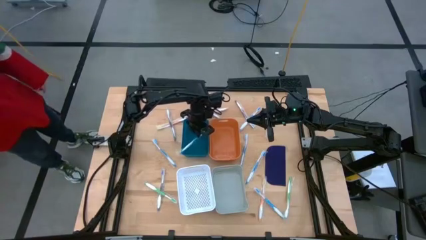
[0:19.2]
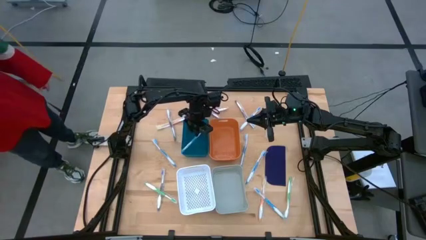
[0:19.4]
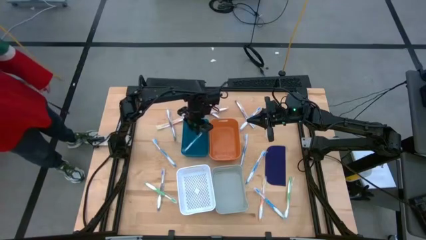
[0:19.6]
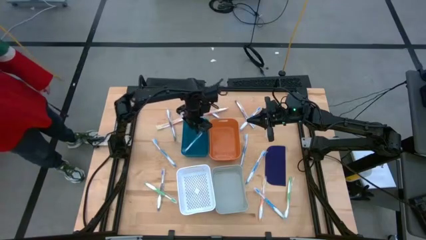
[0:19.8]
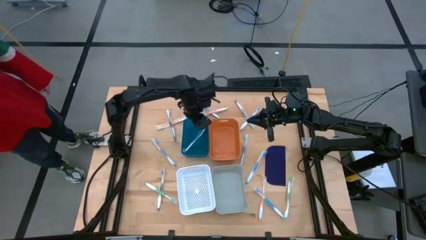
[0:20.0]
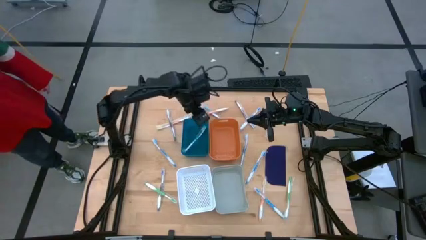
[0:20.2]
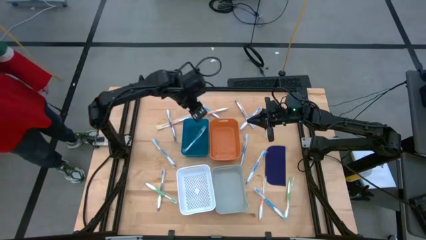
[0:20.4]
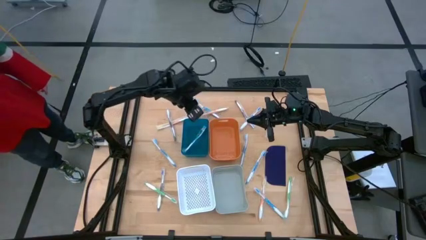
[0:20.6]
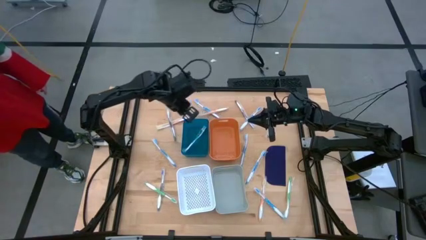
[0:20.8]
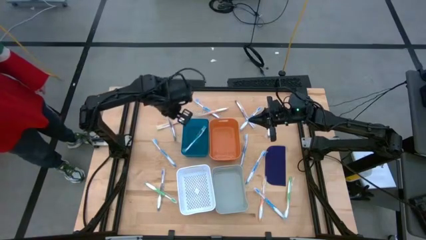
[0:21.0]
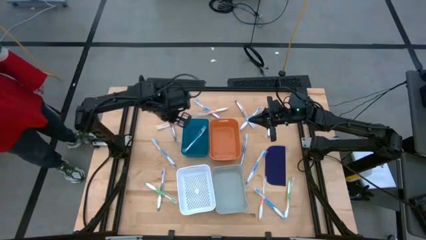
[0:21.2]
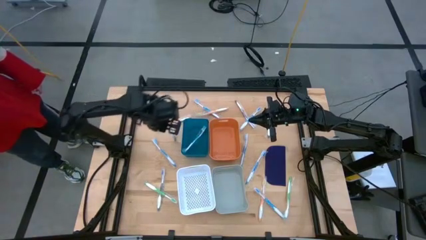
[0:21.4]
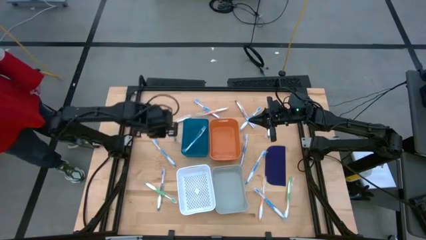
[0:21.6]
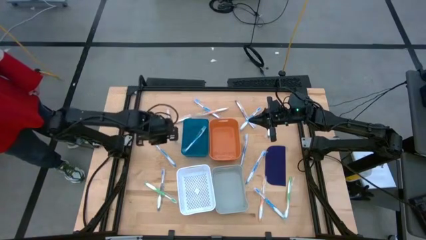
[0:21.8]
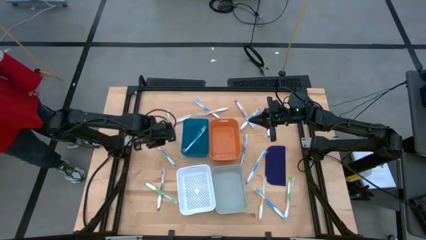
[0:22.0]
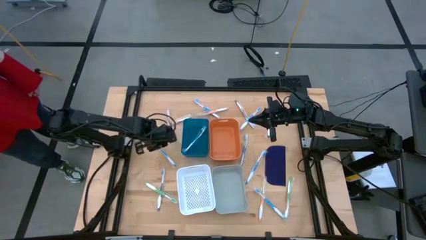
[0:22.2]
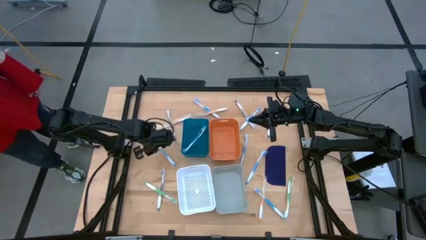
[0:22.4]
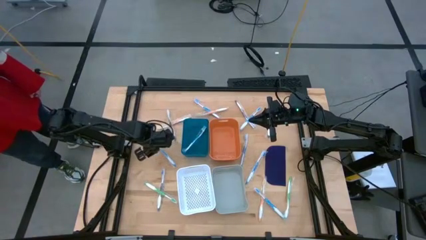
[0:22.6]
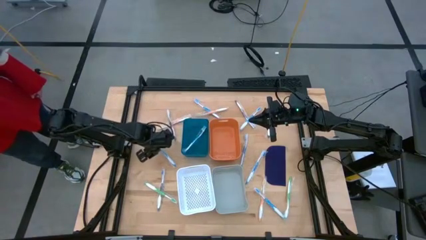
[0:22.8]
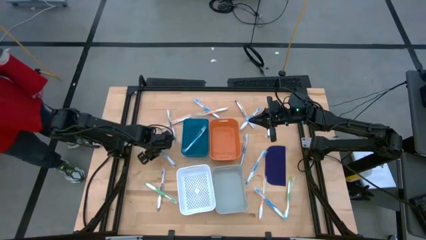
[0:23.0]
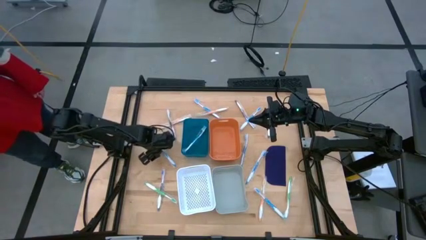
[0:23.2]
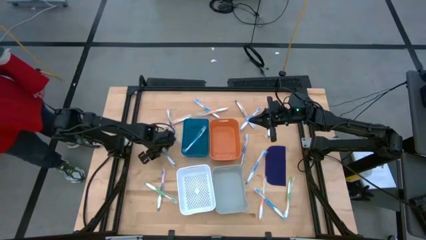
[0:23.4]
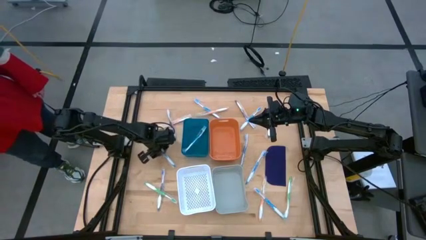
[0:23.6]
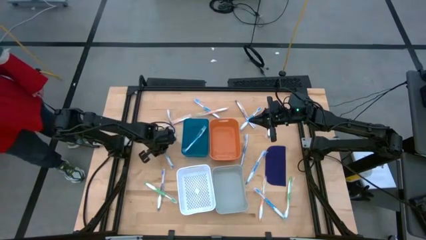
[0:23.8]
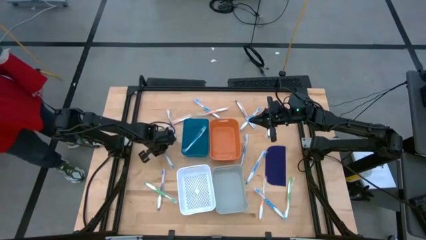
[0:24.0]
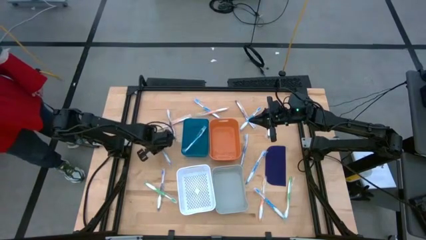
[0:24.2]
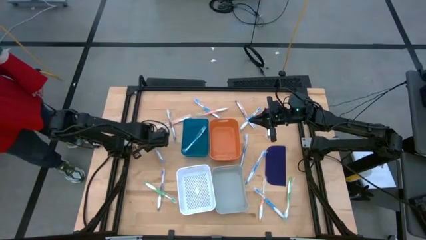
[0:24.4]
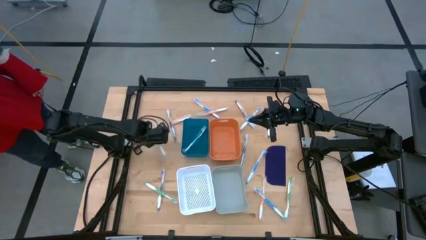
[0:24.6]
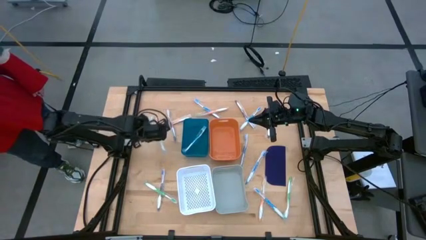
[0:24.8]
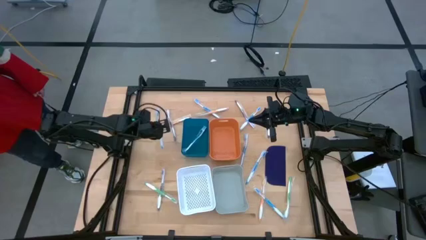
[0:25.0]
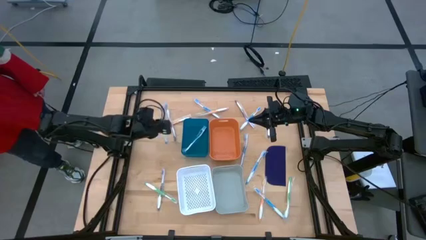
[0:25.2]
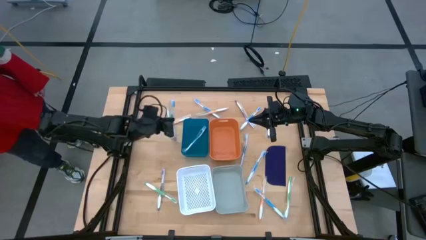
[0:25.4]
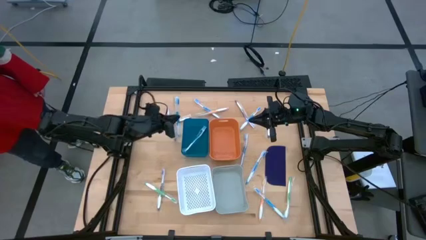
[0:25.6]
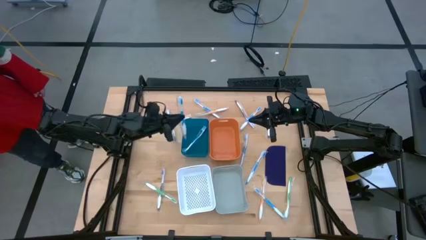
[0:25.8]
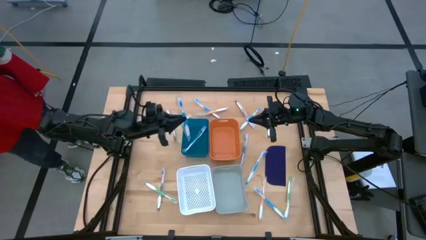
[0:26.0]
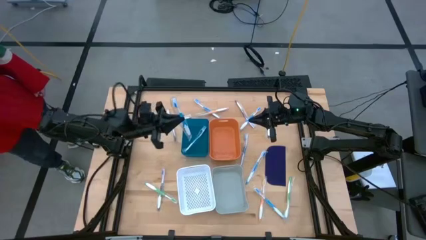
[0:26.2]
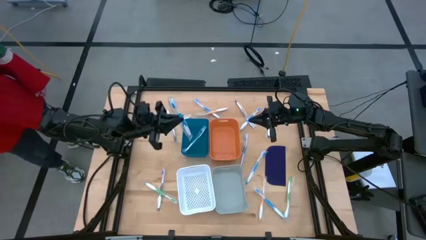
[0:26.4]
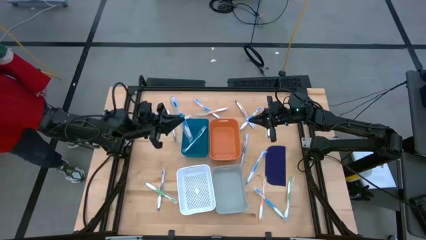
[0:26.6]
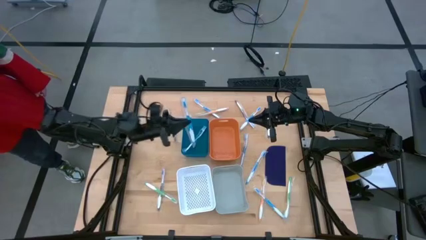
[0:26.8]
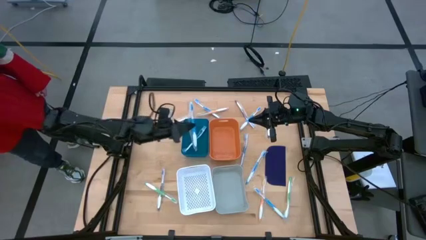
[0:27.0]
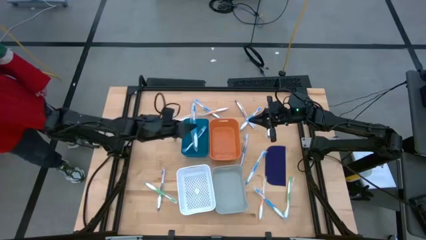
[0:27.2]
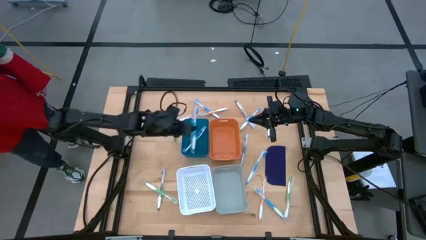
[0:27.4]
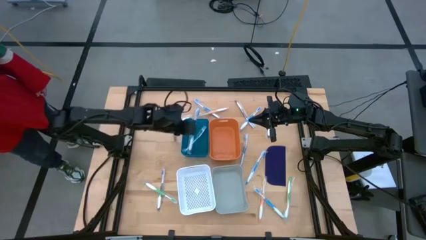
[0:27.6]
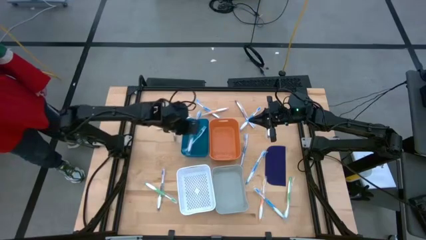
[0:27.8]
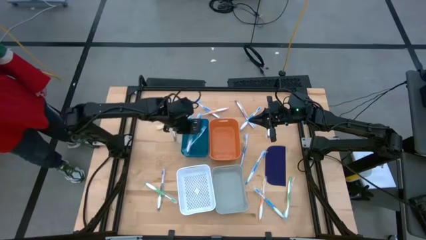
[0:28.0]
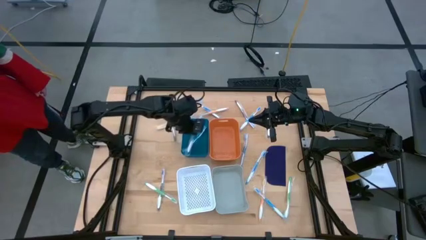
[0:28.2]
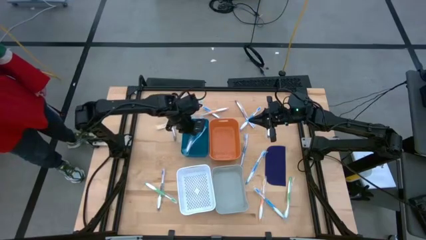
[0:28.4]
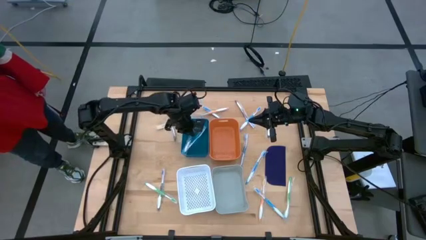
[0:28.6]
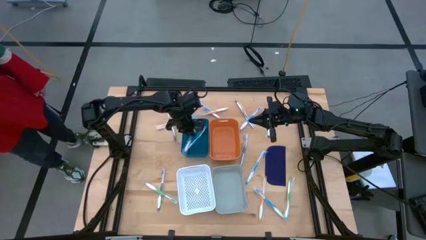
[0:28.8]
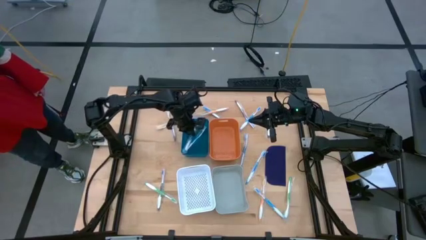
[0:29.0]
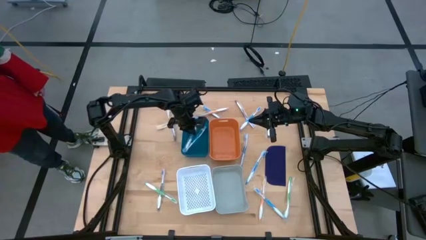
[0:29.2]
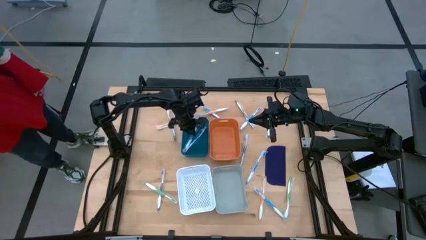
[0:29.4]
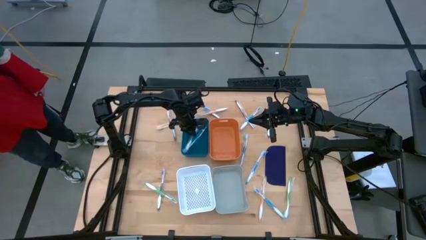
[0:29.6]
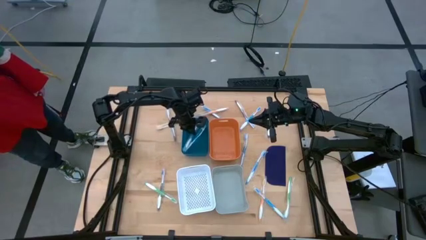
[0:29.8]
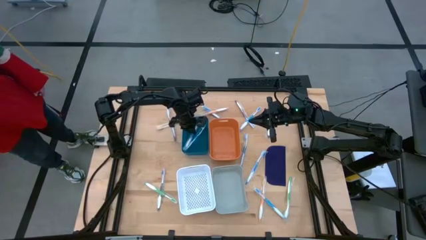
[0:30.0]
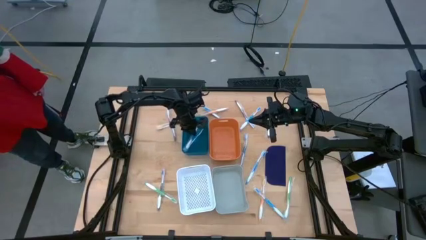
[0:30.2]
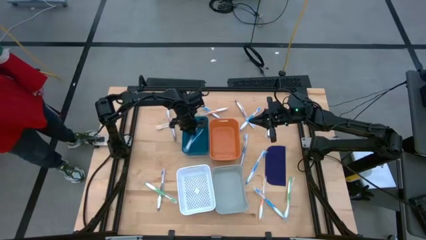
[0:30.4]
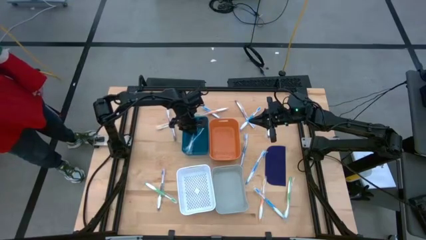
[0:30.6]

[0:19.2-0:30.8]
Task: Pick & Place Toothbrushes
Put the blue toothbrush into the blue bin

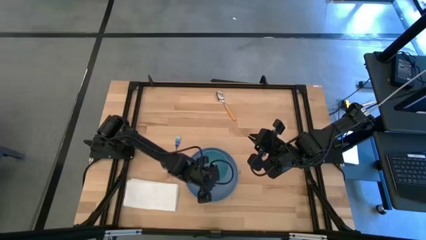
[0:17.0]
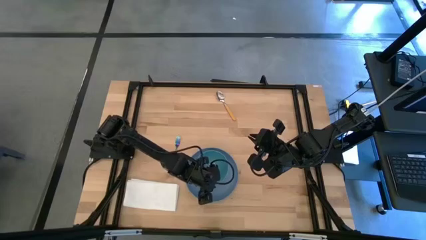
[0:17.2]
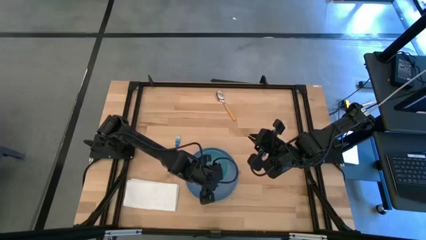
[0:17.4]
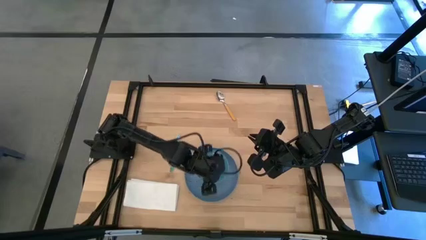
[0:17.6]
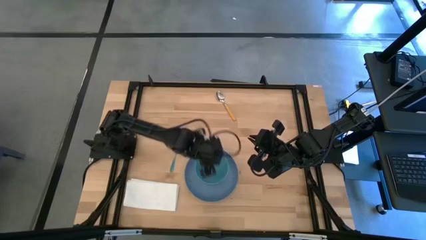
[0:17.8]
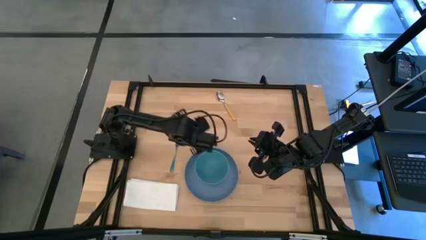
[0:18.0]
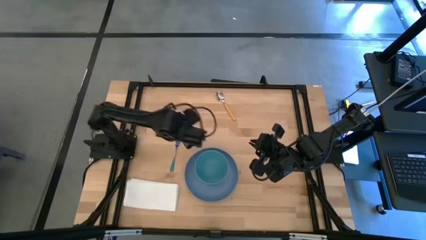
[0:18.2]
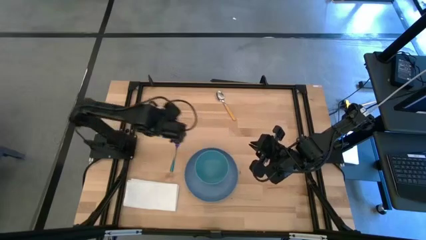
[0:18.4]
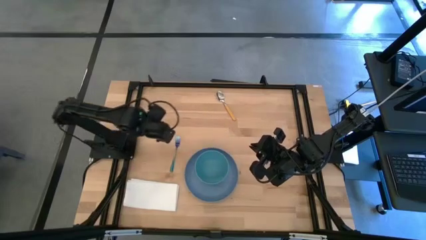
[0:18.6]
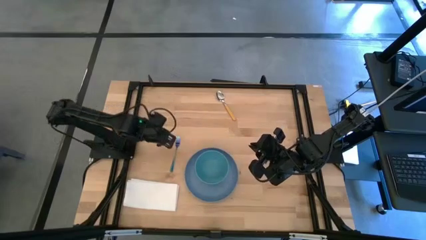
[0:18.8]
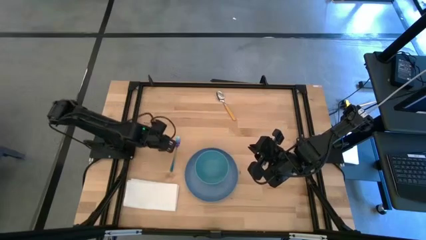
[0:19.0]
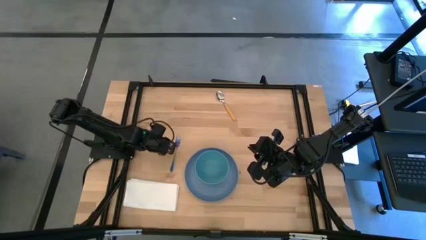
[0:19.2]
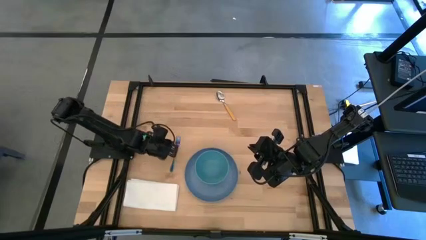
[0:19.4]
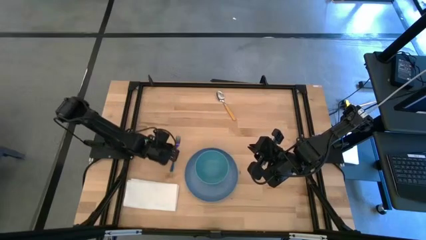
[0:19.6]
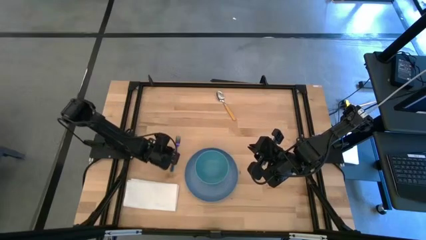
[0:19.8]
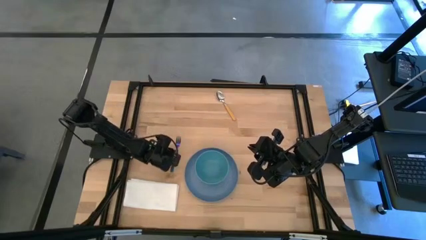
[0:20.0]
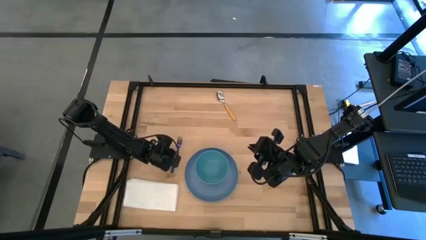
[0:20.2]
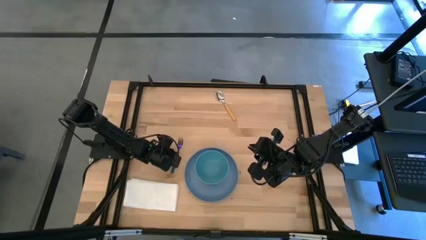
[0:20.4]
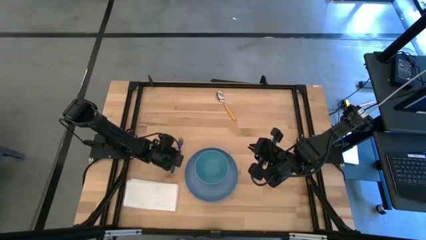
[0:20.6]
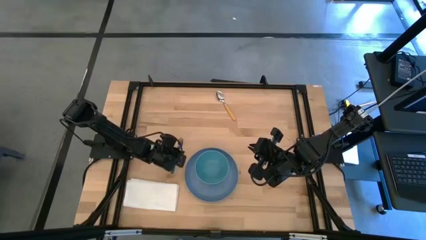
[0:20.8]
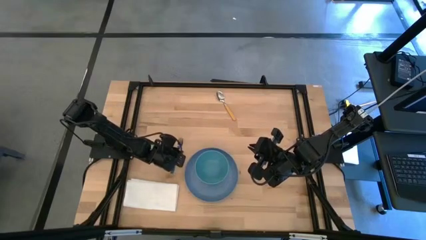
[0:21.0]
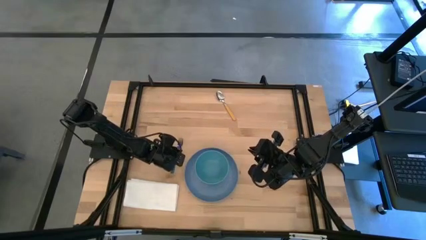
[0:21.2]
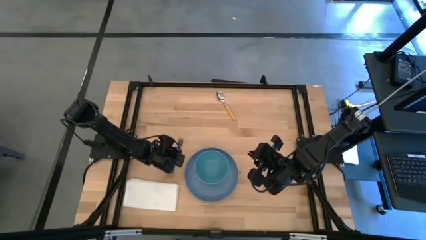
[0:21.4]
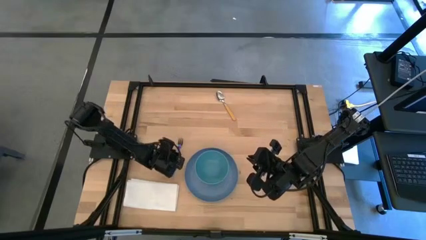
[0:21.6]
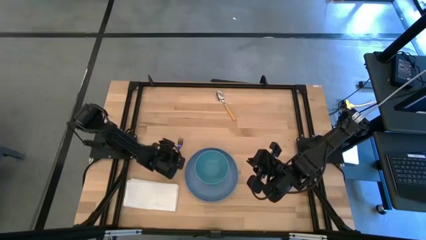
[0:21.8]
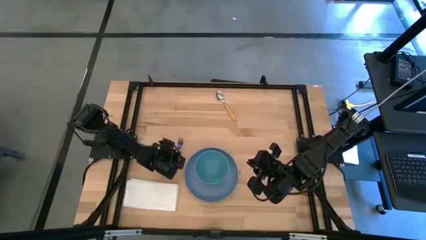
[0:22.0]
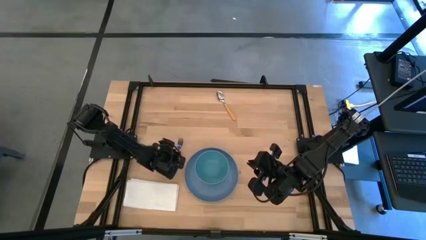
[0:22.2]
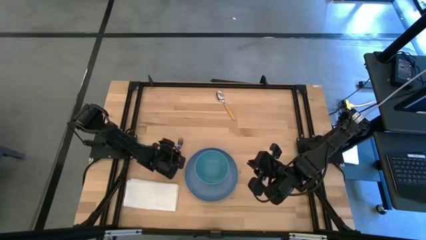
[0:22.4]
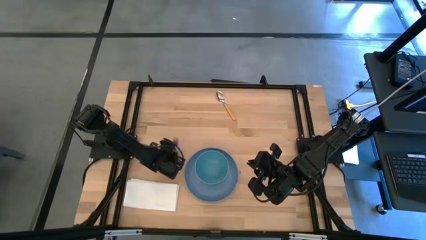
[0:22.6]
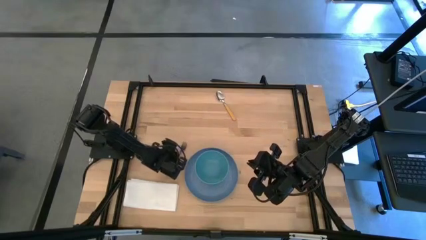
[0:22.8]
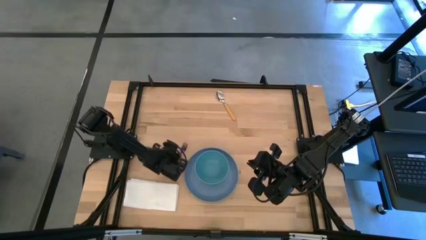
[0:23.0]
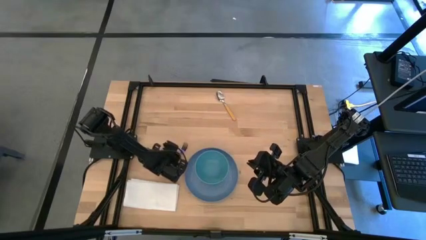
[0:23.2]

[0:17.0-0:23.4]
Task: Set table place
Move the fork to the middle left of the table
